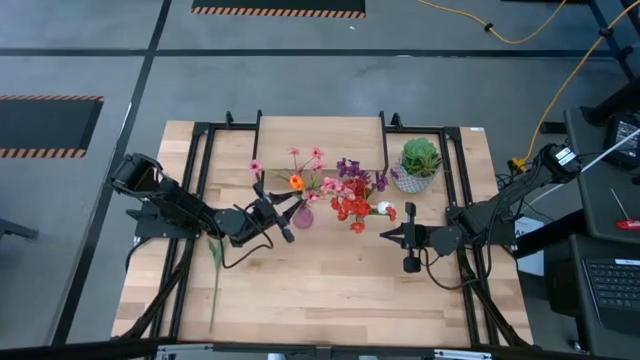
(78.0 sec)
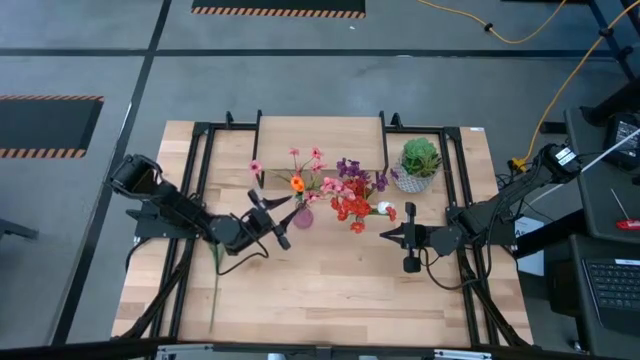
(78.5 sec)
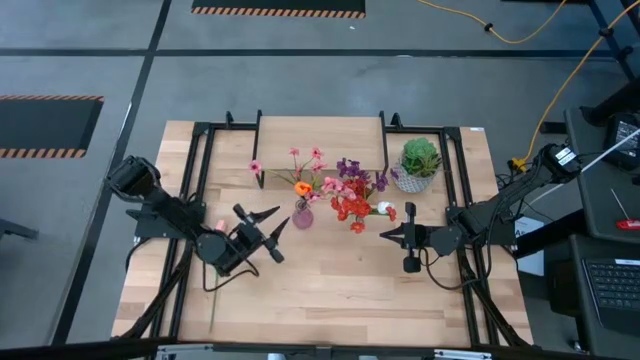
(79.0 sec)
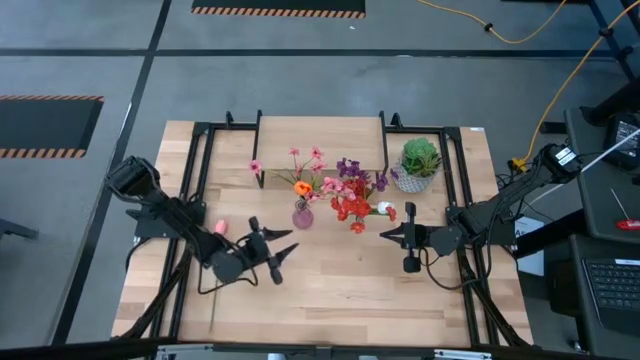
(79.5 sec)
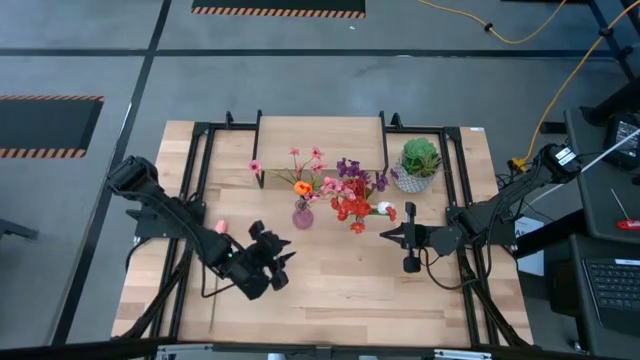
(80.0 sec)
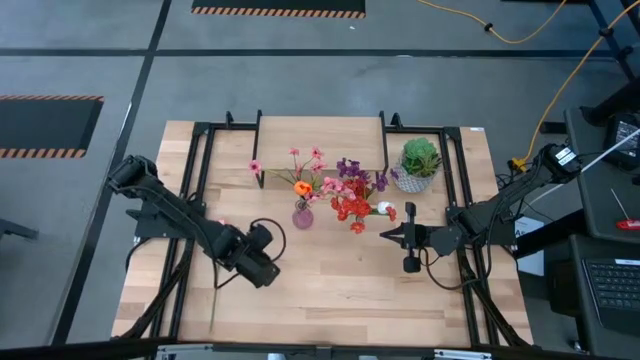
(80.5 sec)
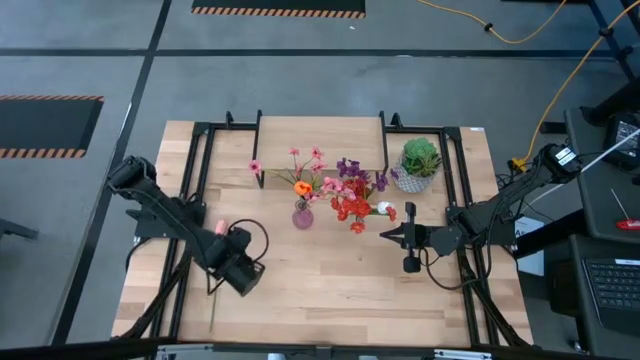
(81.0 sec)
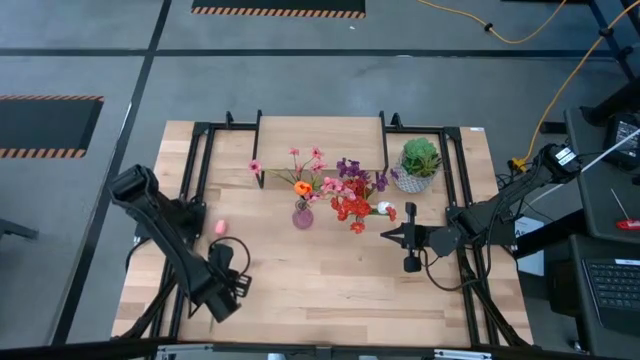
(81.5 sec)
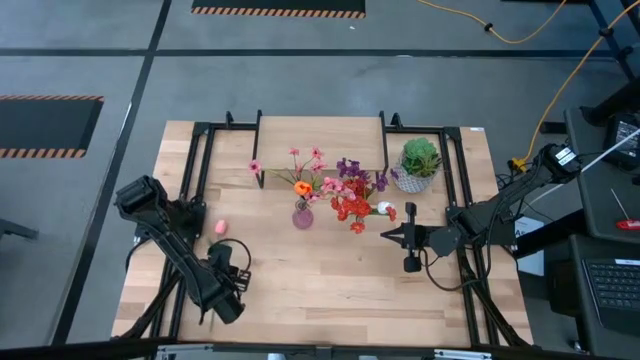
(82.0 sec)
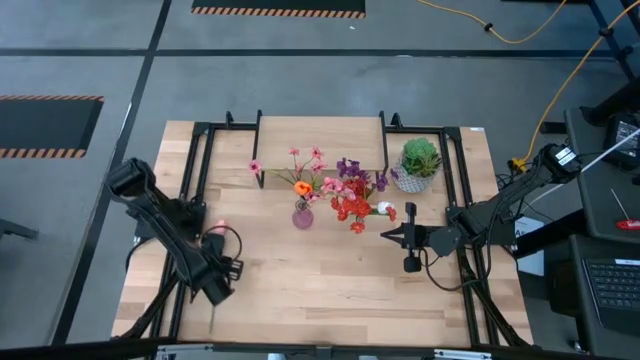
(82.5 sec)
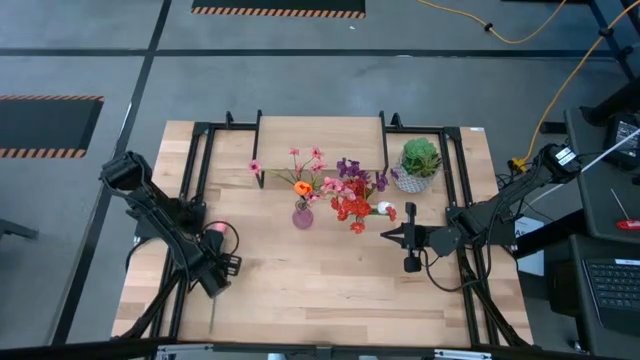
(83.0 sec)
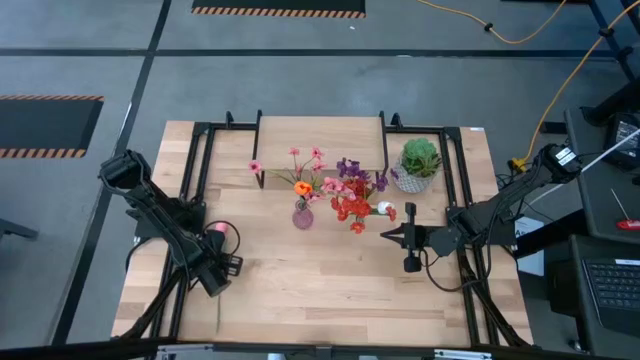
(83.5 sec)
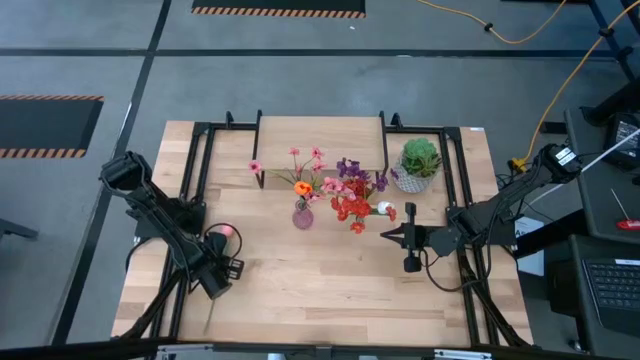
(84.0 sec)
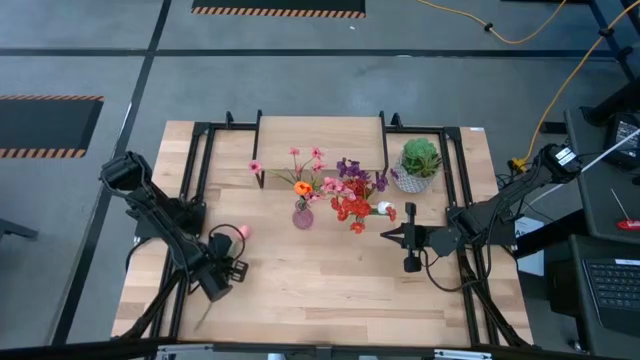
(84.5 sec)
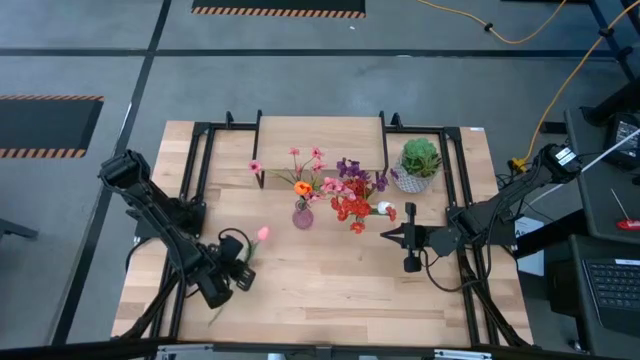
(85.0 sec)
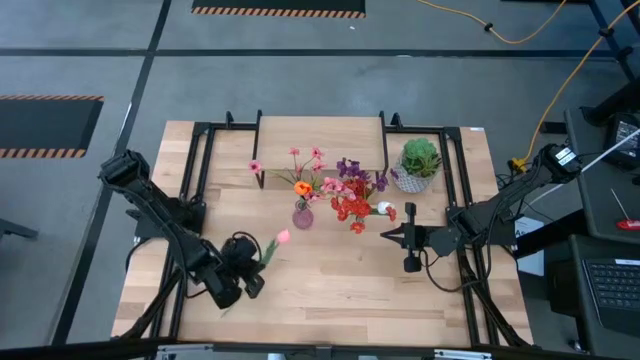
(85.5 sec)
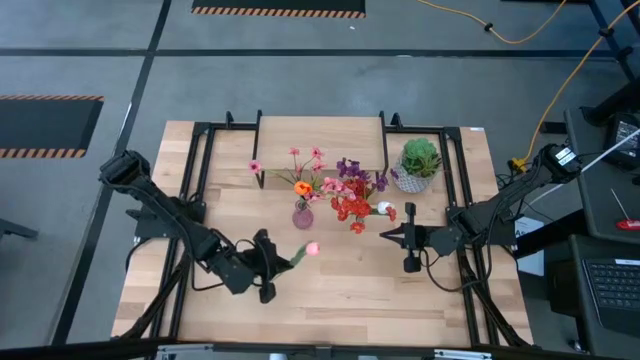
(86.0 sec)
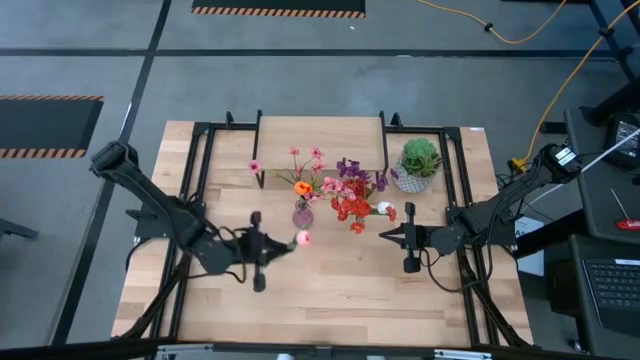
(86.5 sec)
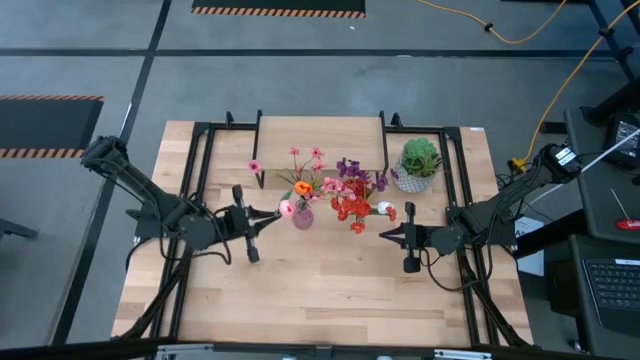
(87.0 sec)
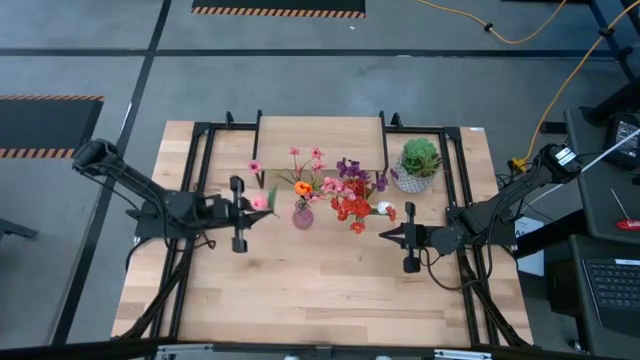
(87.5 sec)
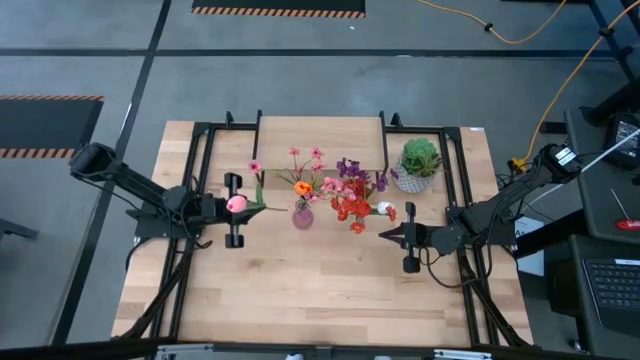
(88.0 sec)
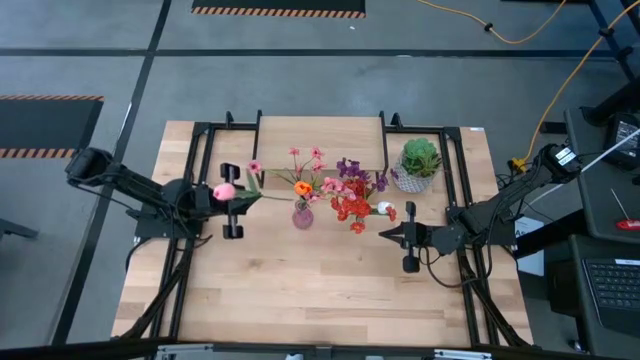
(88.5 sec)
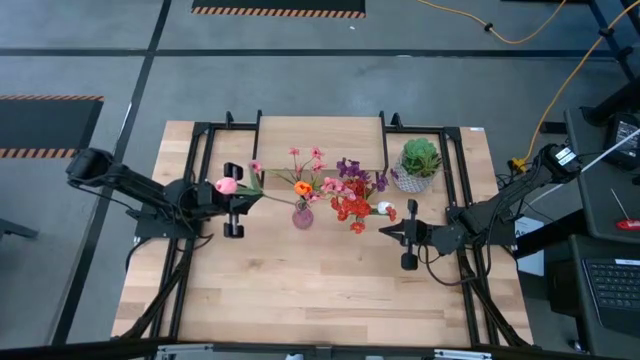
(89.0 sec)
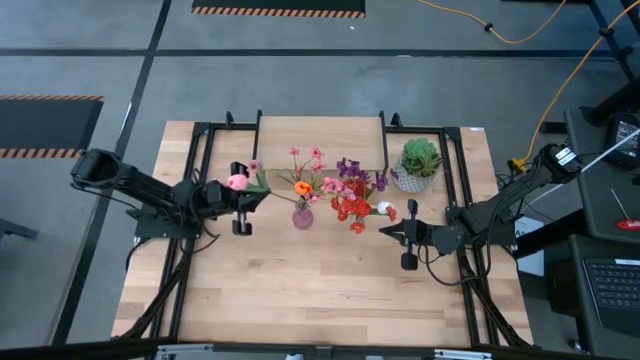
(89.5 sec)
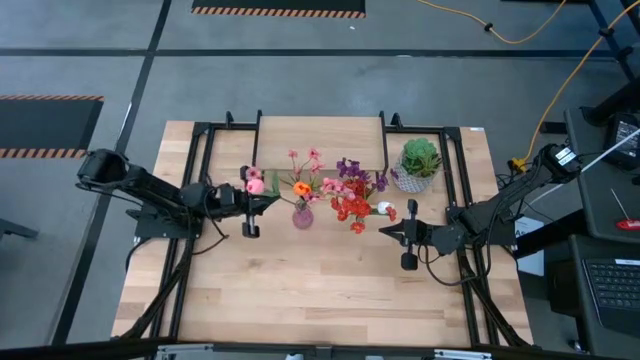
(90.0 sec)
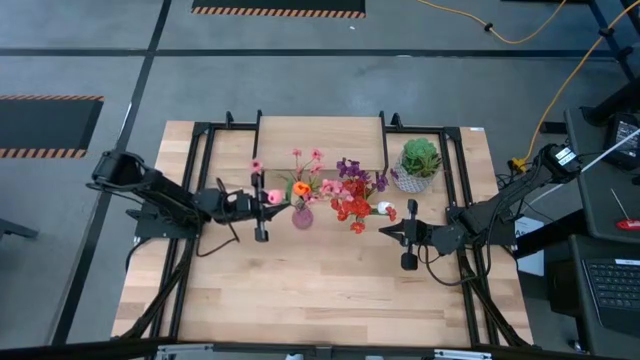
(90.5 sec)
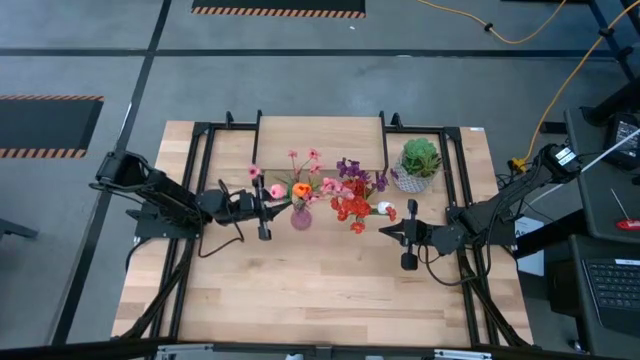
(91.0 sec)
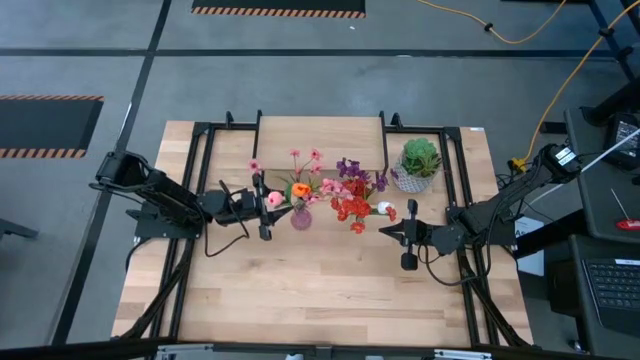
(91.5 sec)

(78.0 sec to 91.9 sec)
Task: Pick and place flowers into a vace then onto a shelf
Put the pink flower into the purple vase

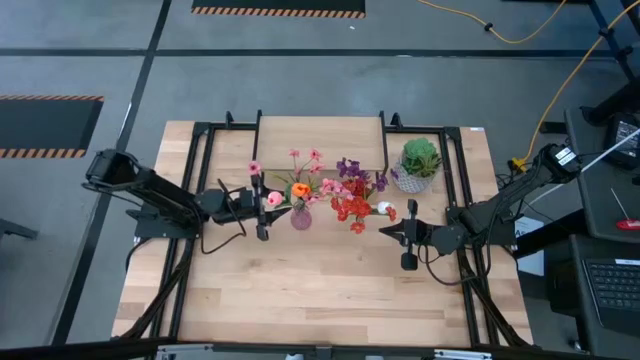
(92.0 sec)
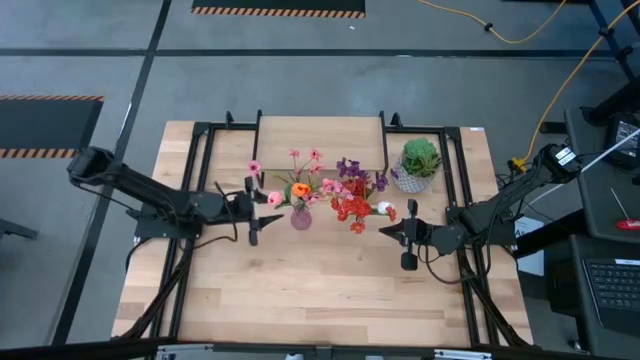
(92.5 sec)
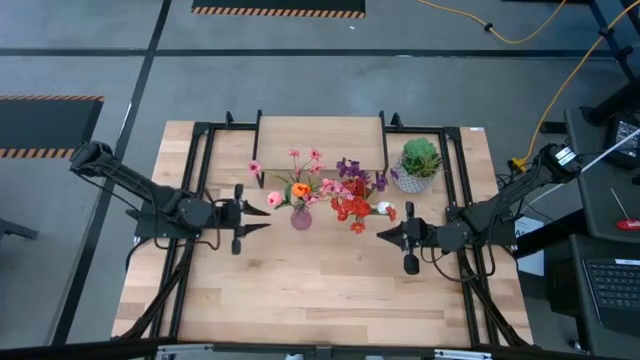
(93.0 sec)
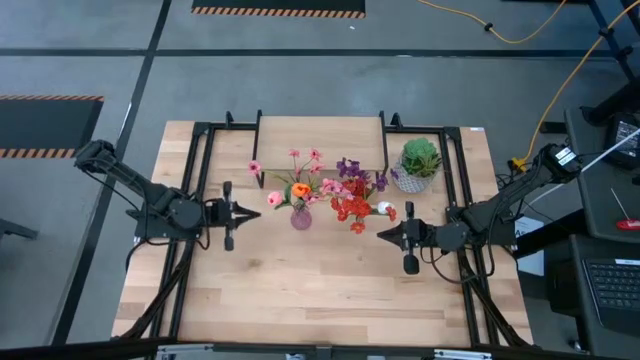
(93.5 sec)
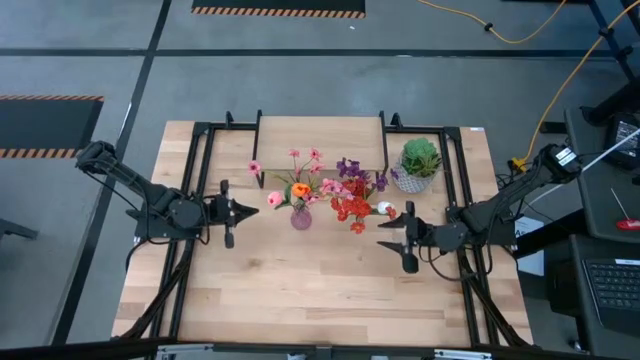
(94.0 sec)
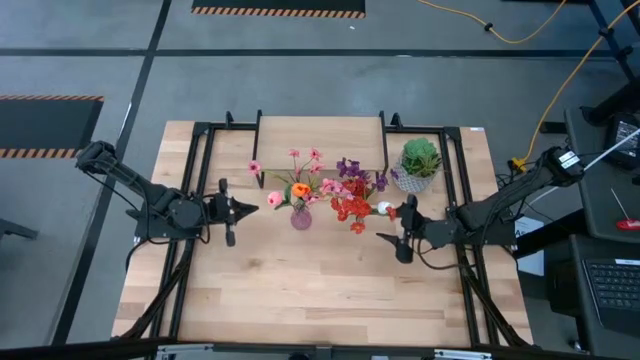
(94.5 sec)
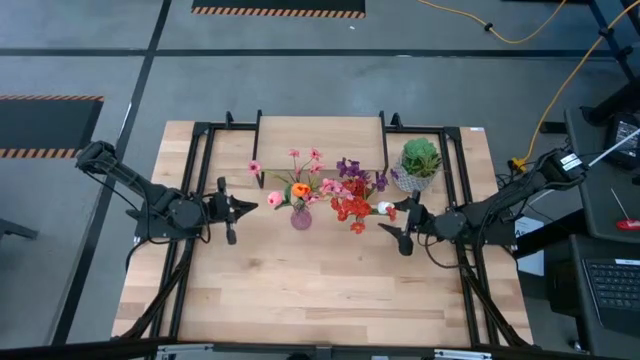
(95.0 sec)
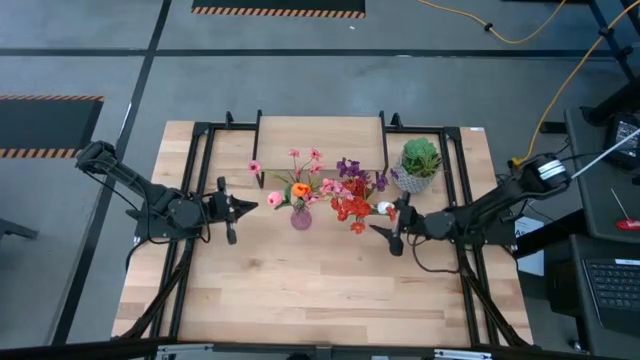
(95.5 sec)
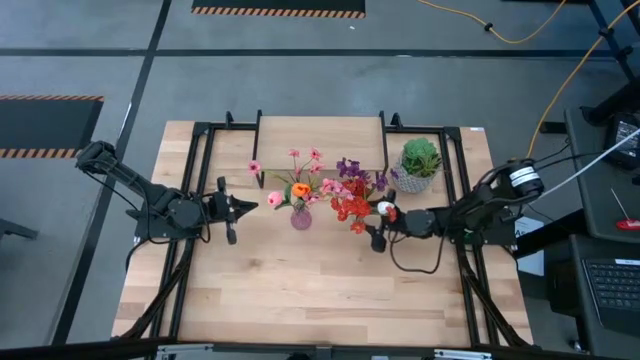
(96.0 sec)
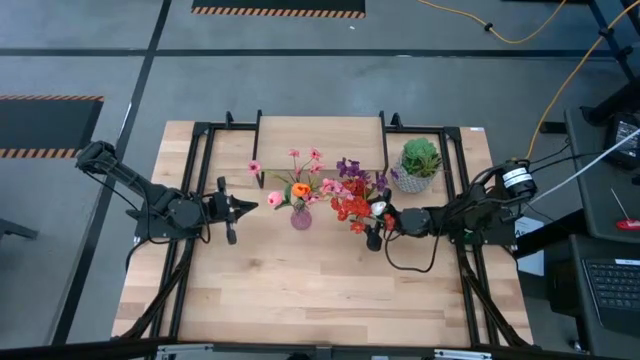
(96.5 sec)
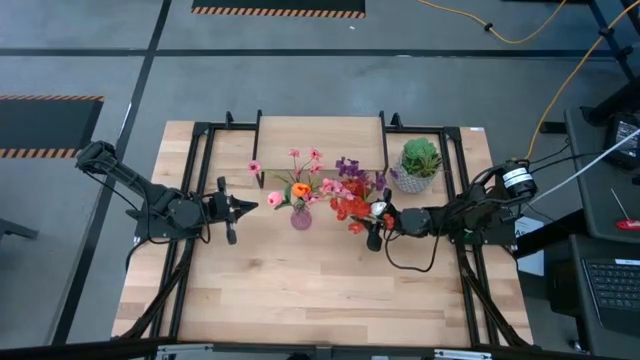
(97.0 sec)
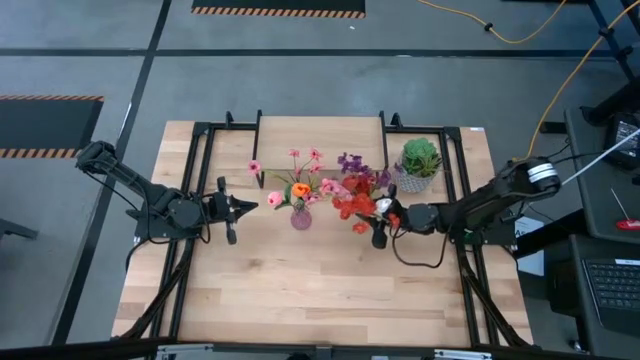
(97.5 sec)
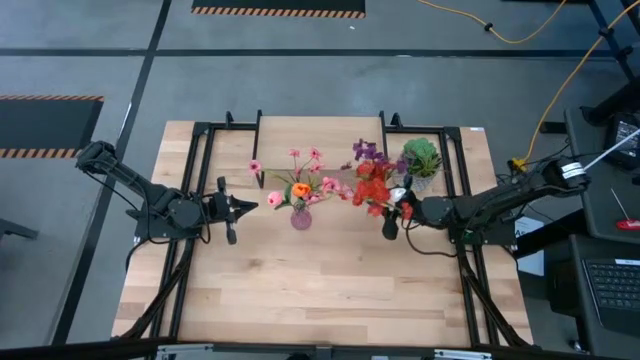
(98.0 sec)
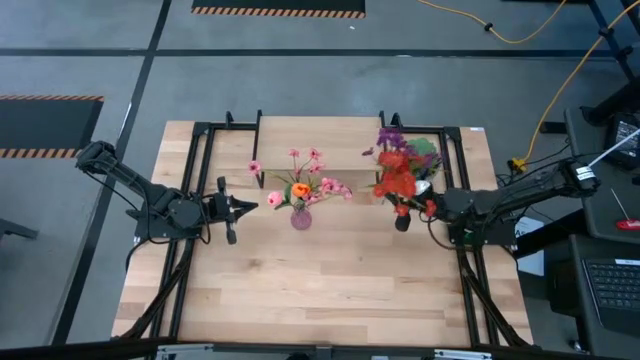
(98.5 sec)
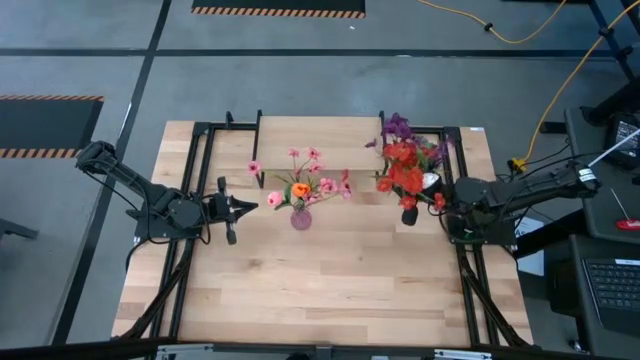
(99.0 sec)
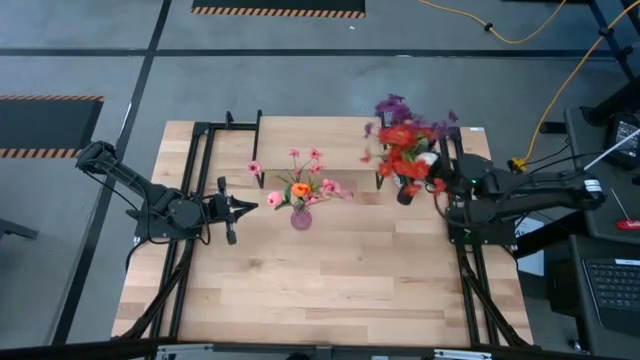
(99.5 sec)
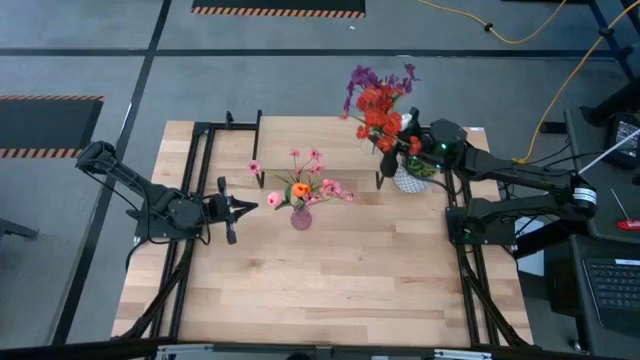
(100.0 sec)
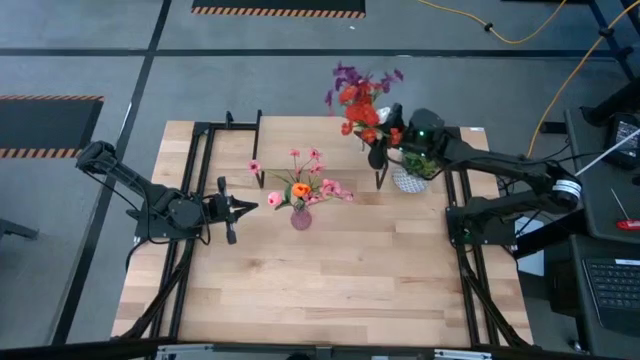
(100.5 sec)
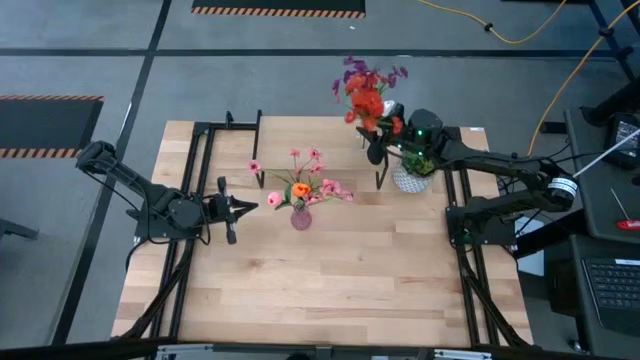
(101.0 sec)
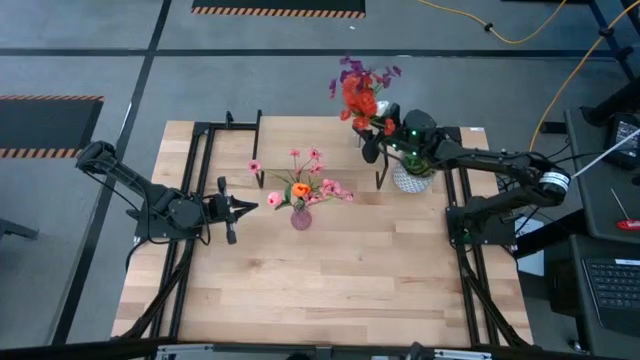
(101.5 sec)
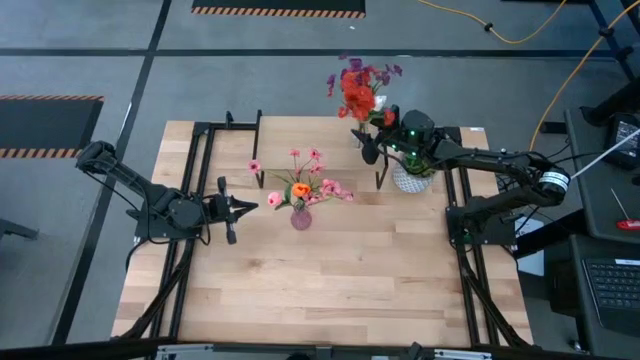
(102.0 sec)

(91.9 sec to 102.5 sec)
Put the transparent vase with flowers on the shelf
